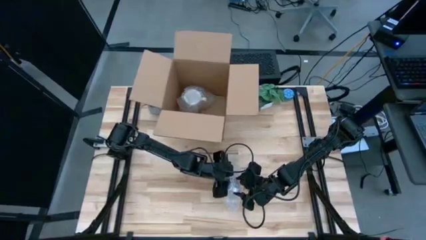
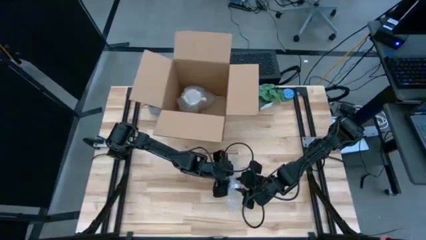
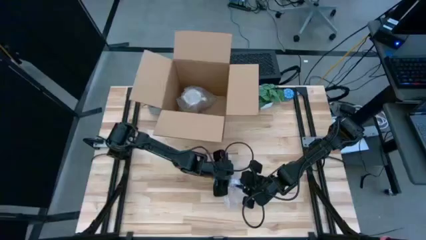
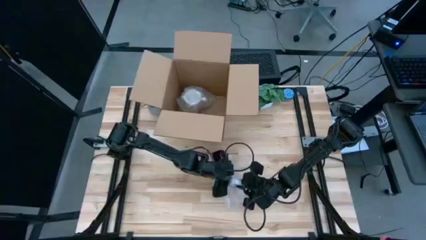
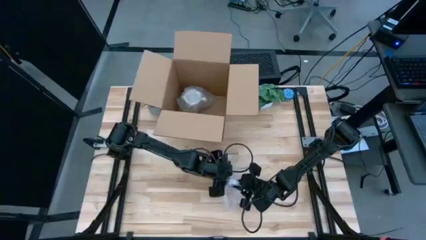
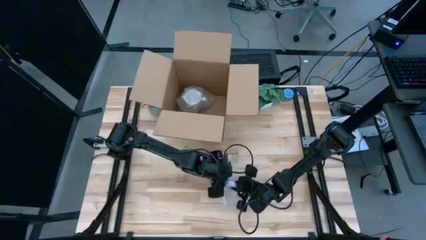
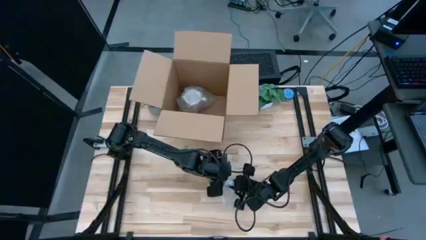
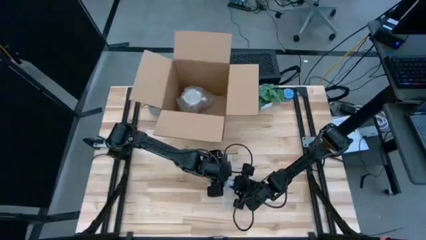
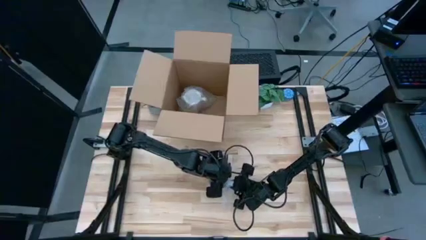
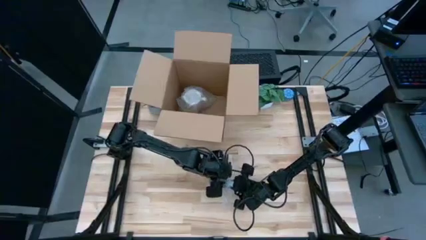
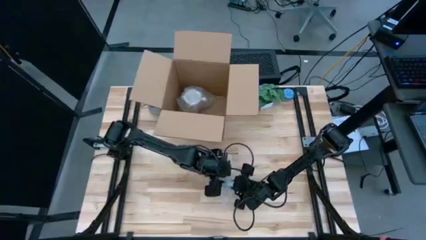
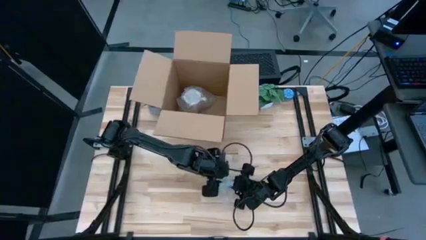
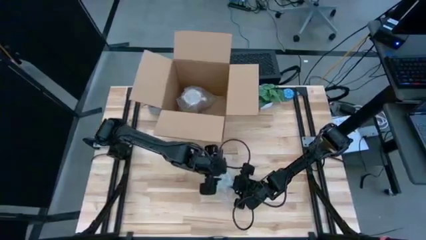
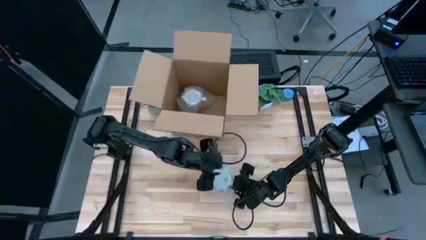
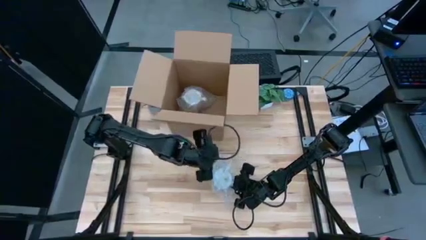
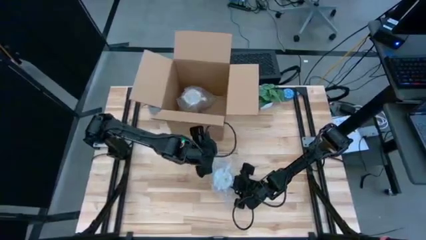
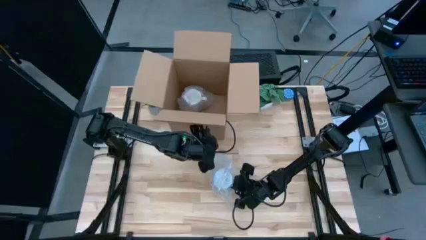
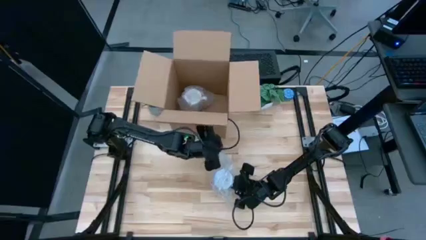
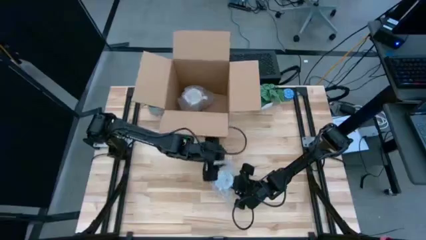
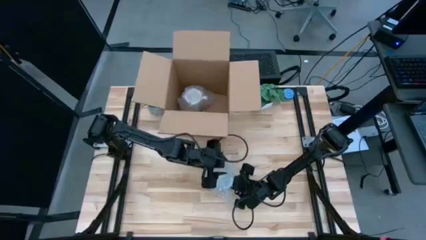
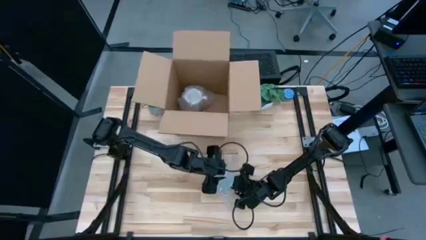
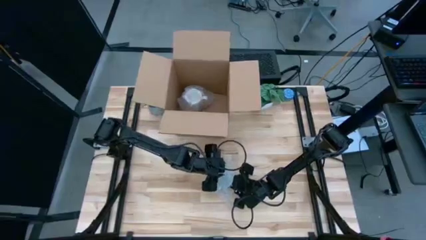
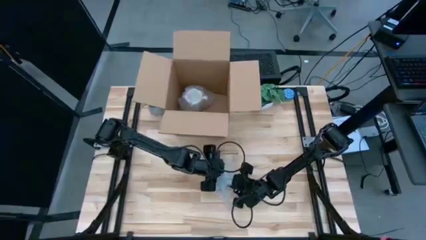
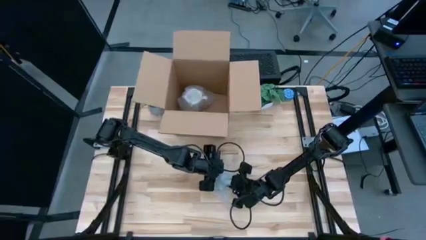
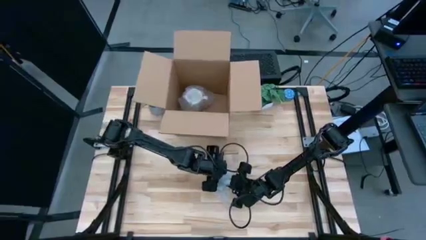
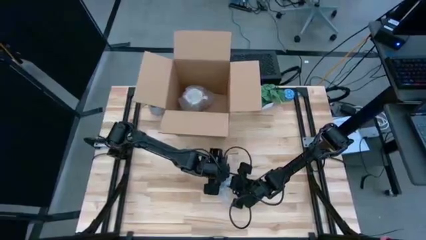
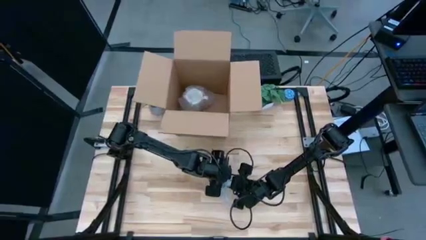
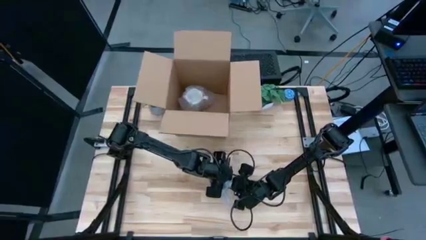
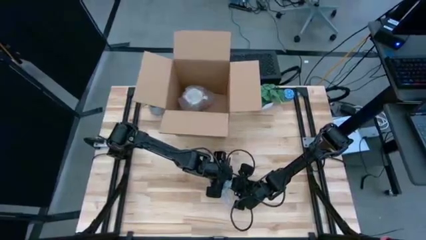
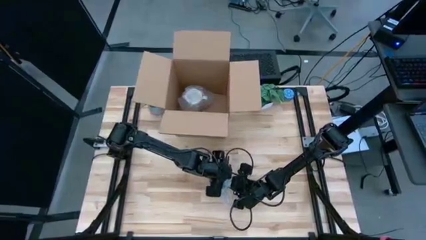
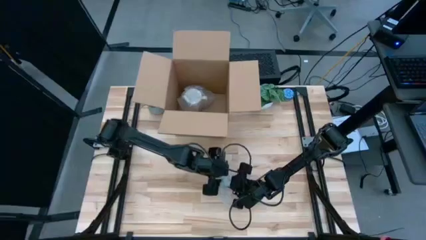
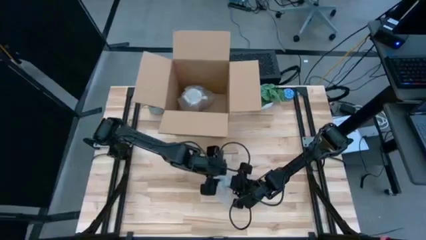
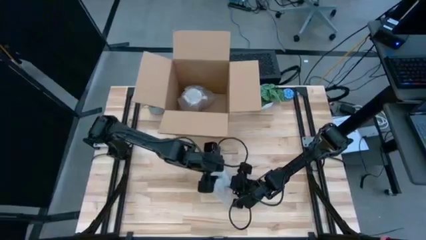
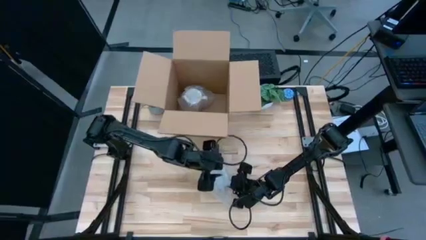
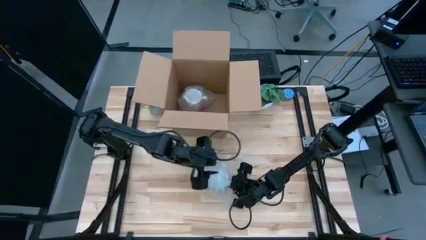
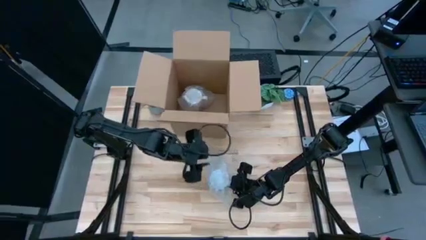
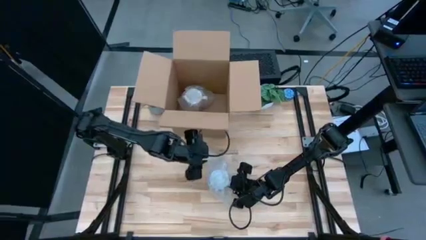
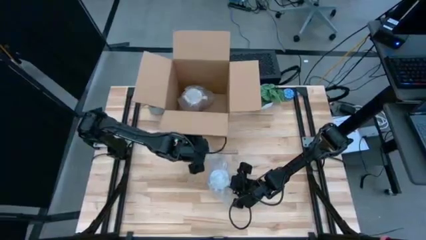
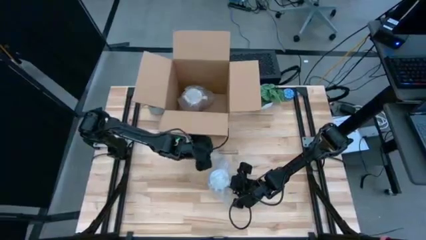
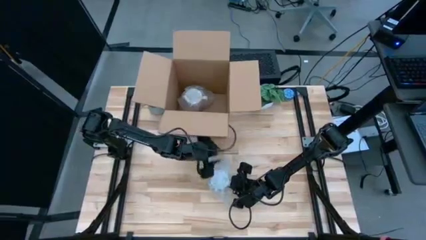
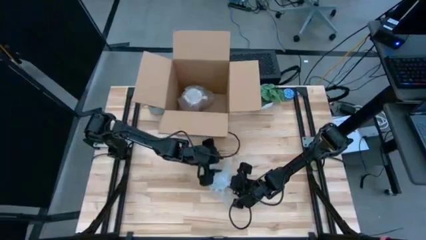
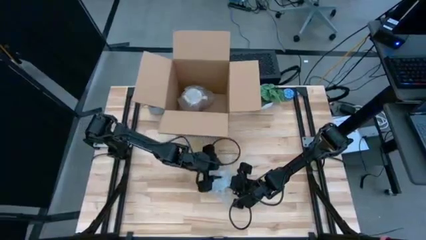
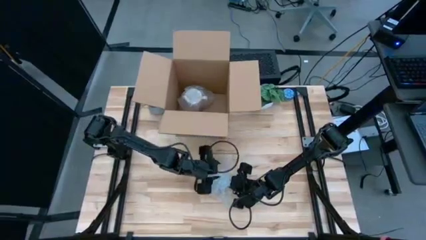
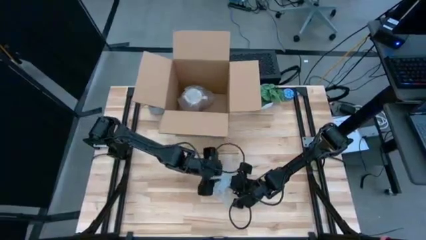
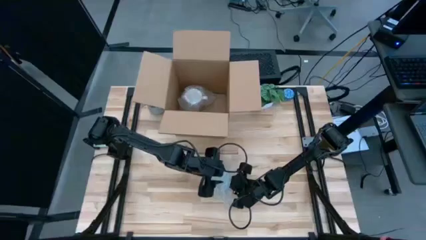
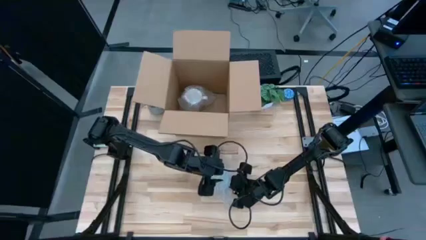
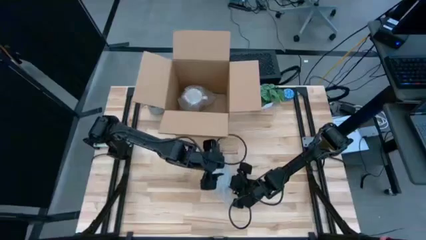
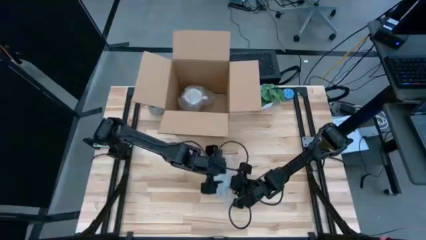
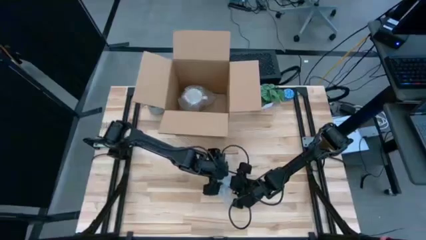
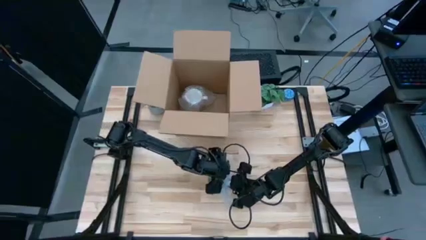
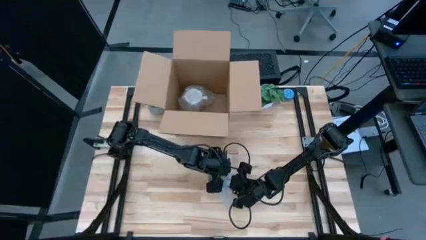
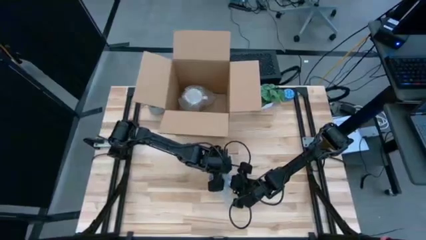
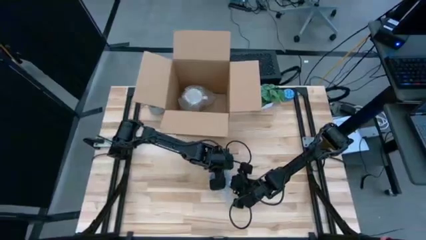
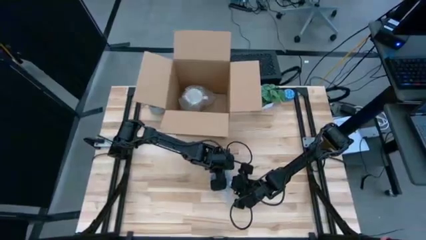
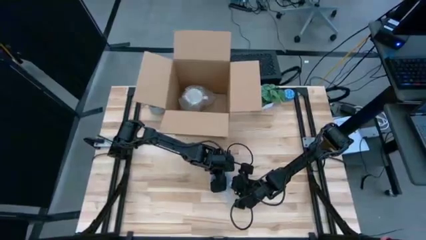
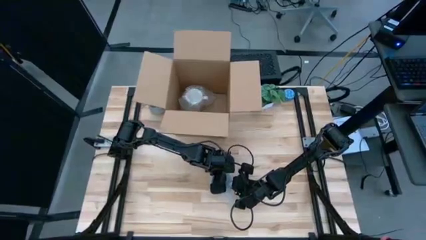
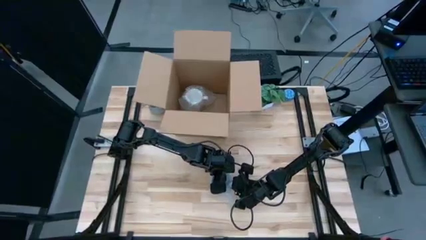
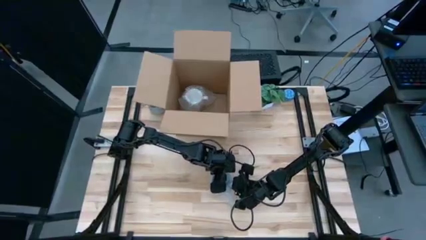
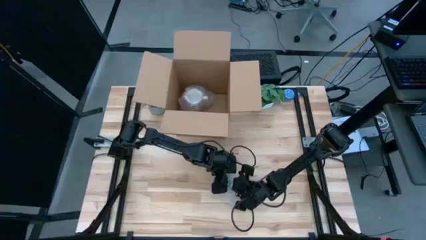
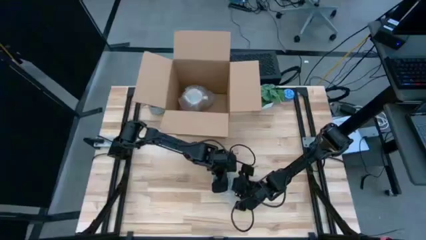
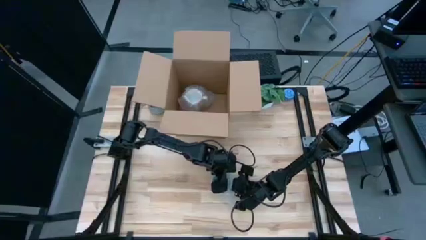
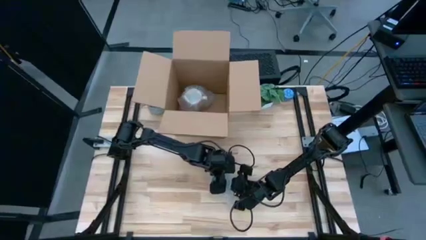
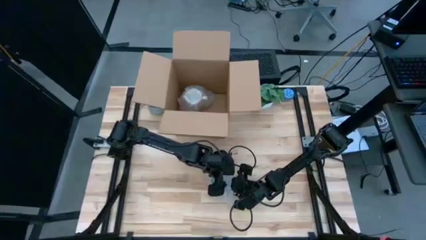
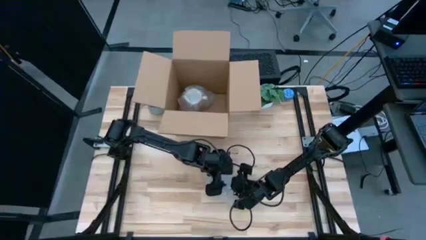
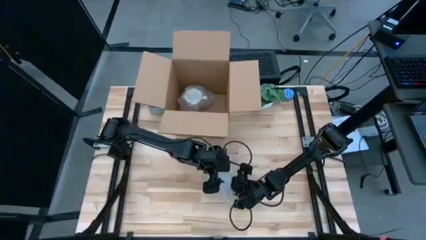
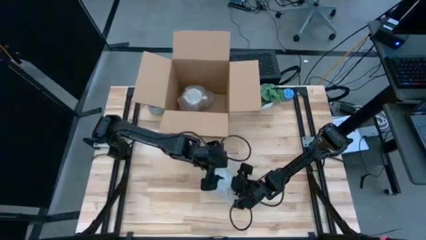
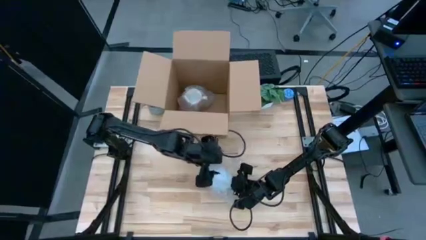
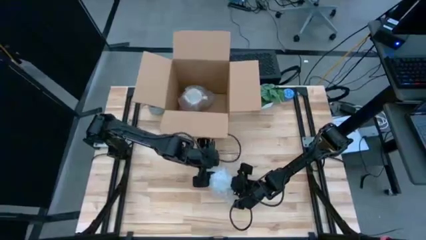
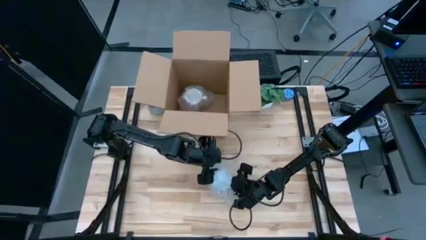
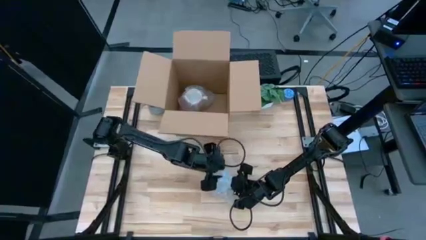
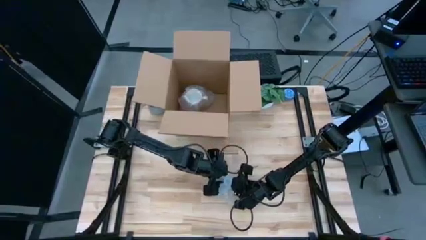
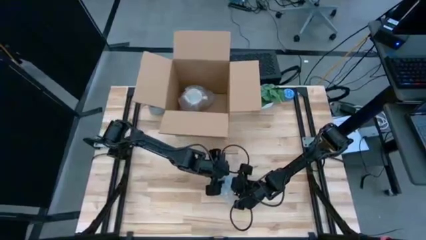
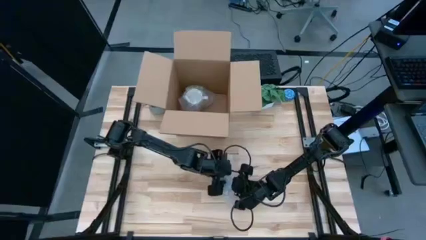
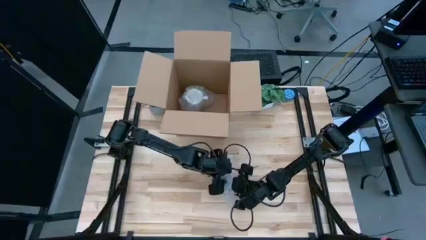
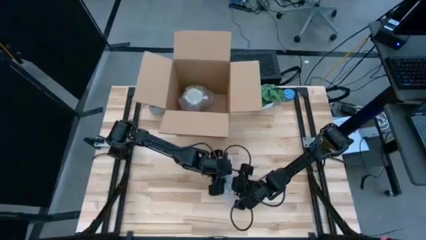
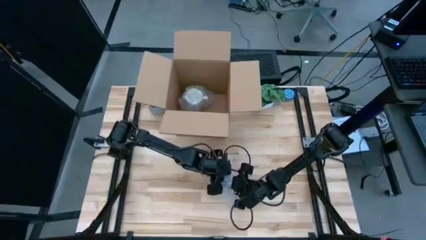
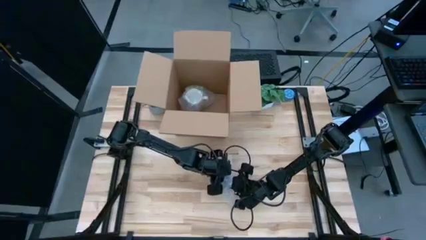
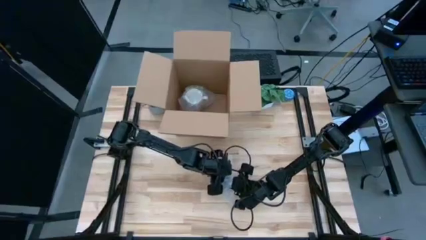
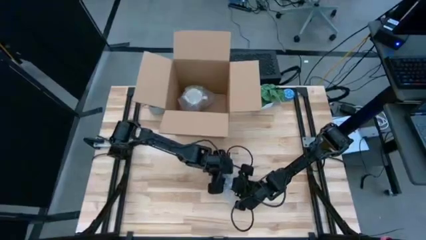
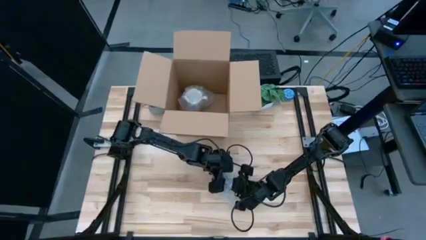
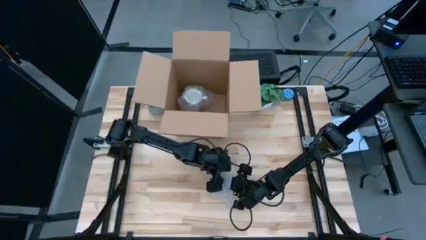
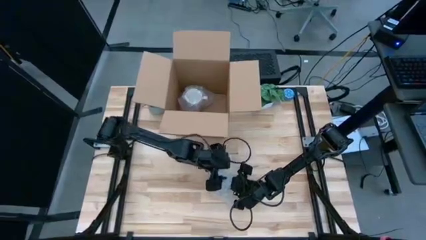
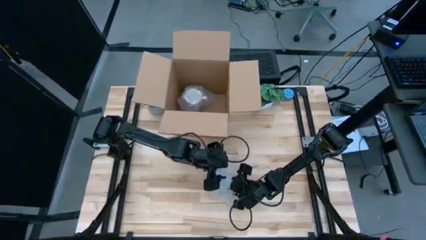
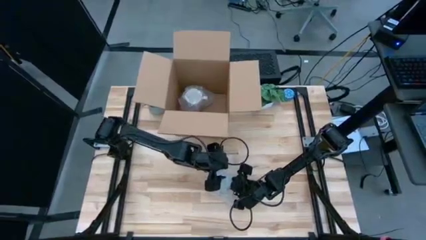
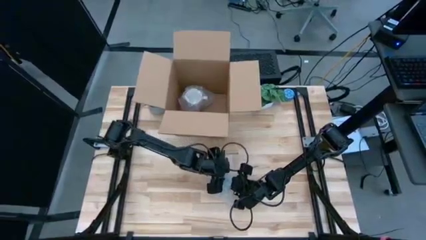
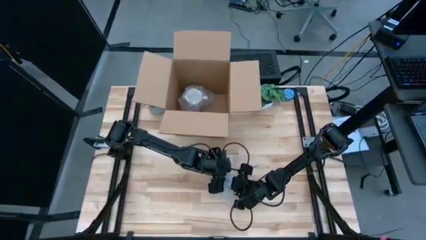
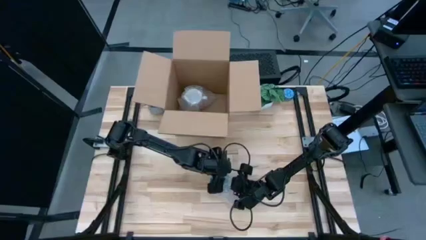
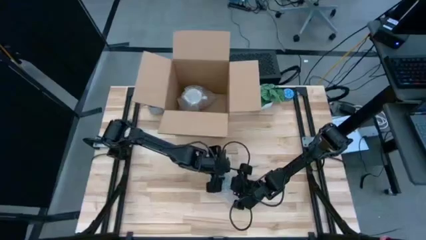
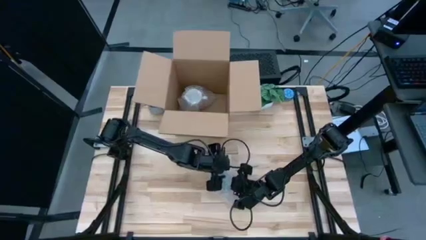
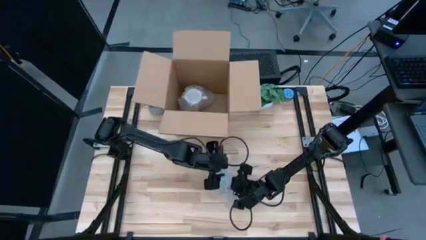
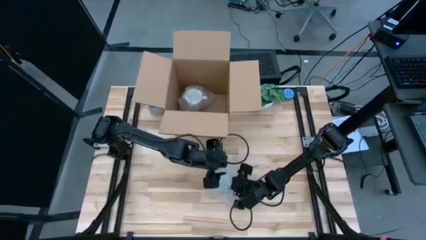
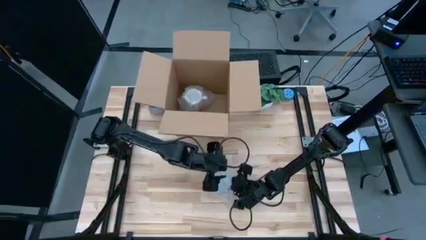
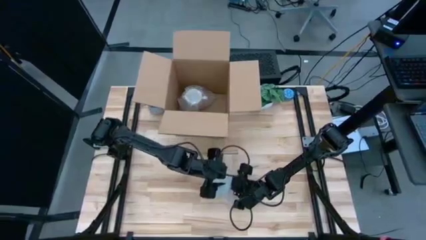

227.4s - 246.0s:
Task: wrap mug
Wrap the red mug with bubble wrap
